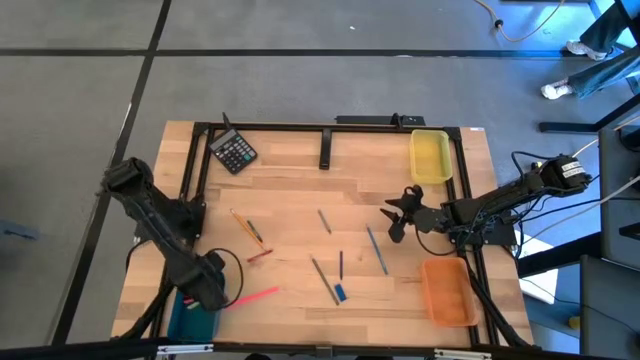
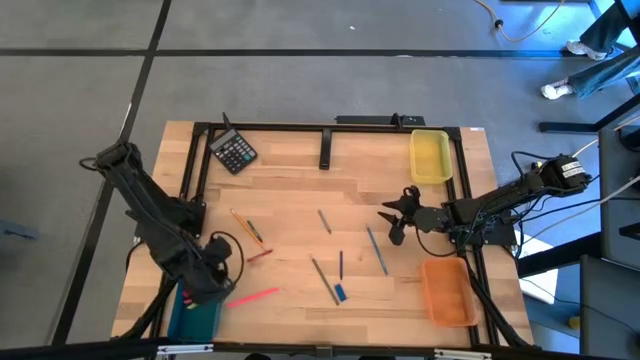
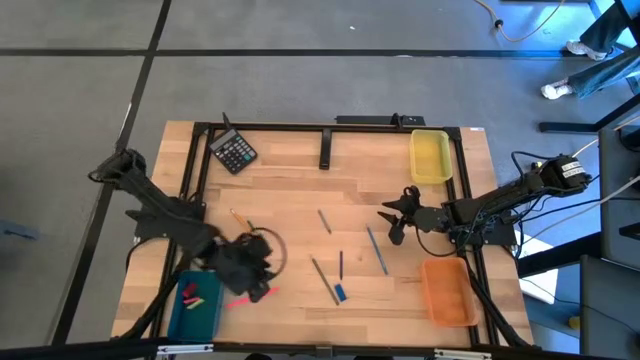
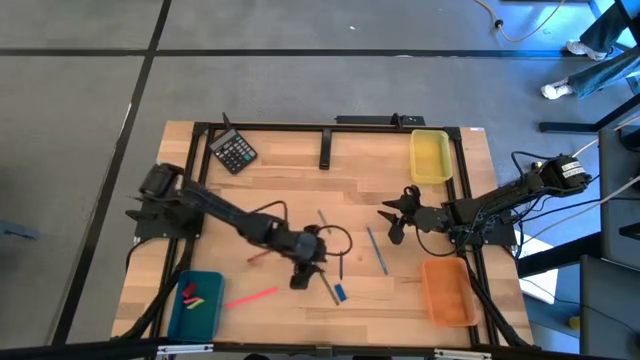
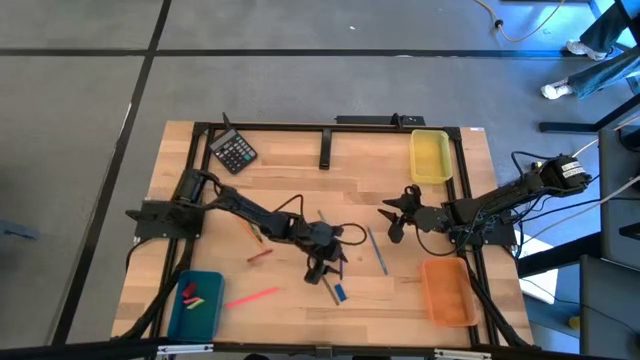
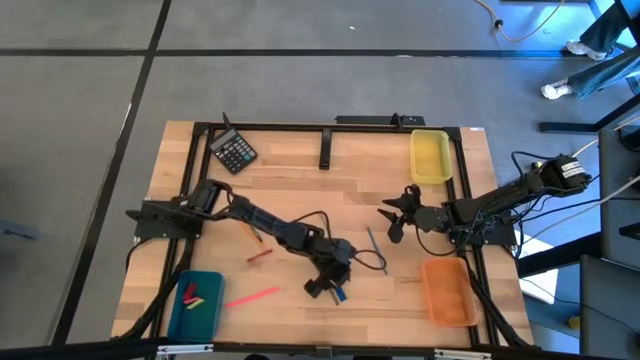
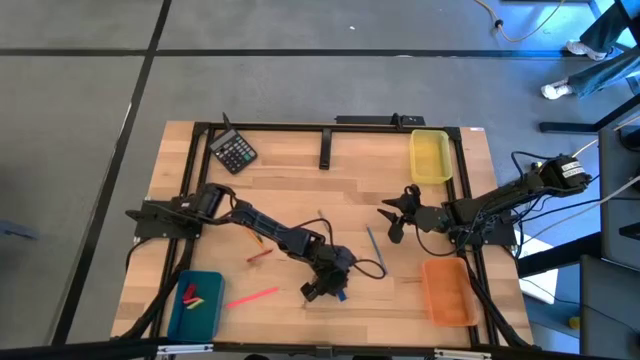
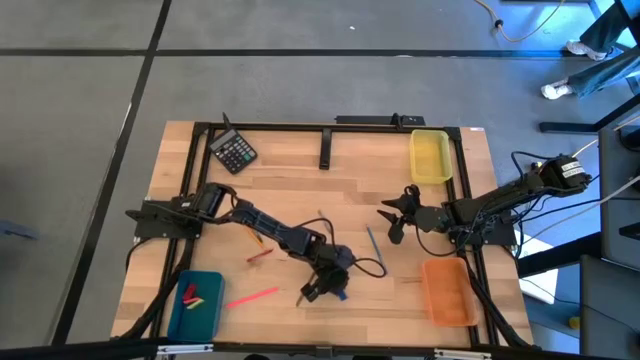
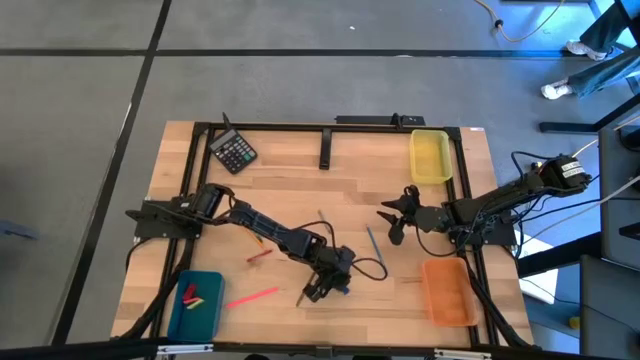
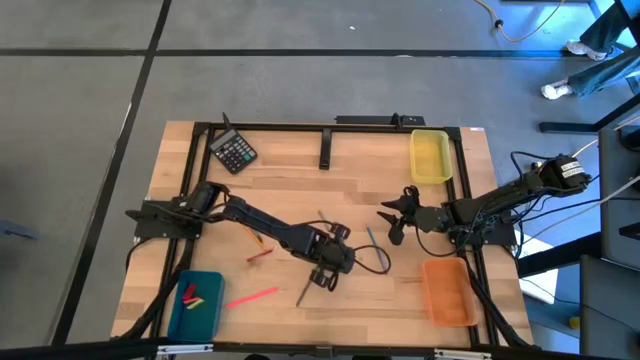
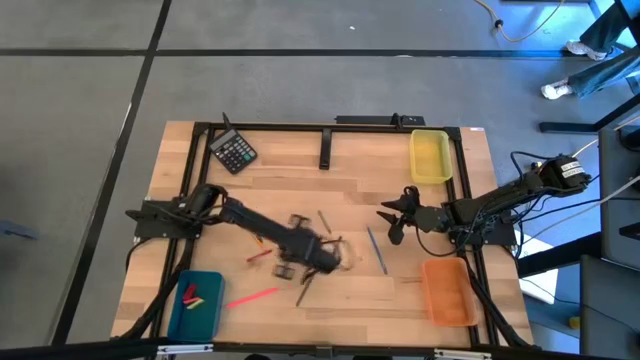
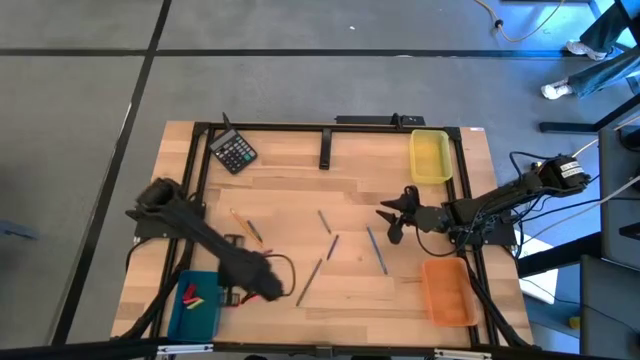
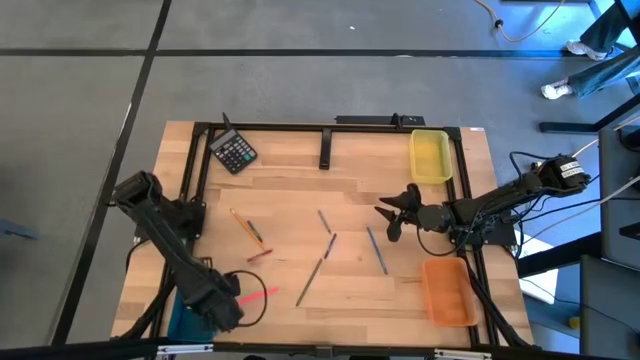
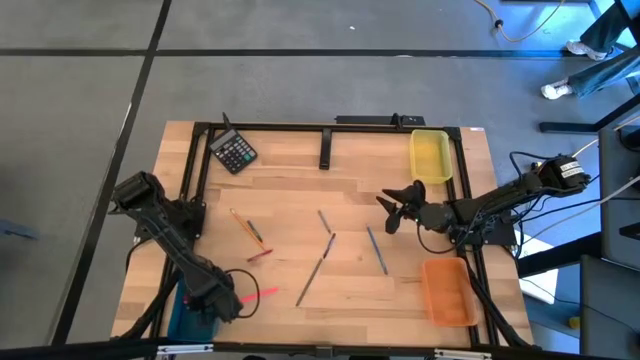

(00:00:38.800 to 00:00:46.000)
Task: Sort crayons/erasers/pens/pencils in bins
Put the blue eraser into the blue bin

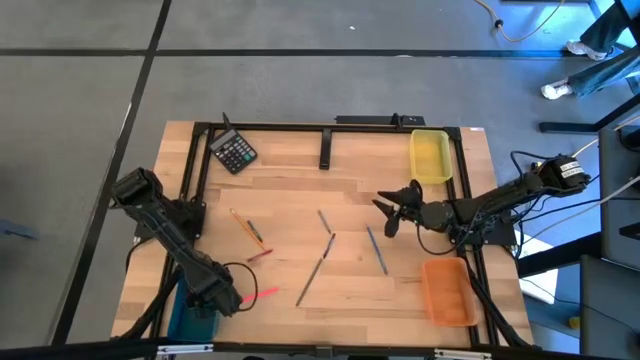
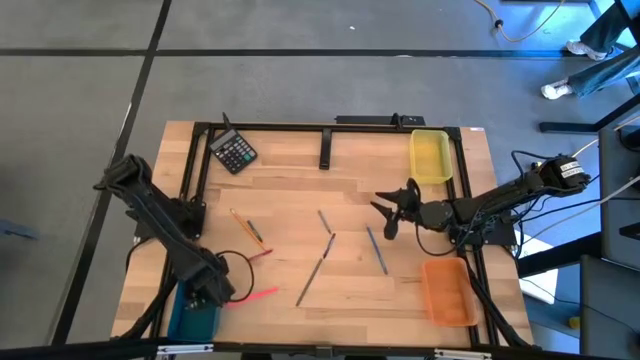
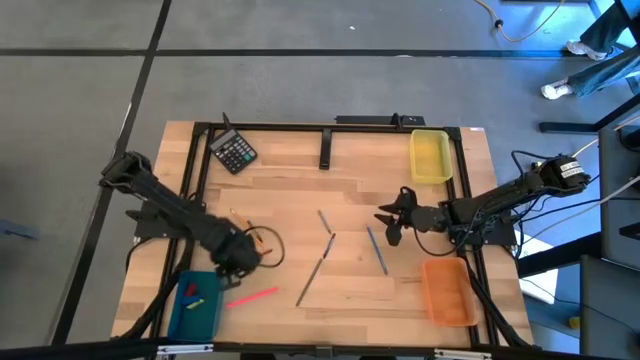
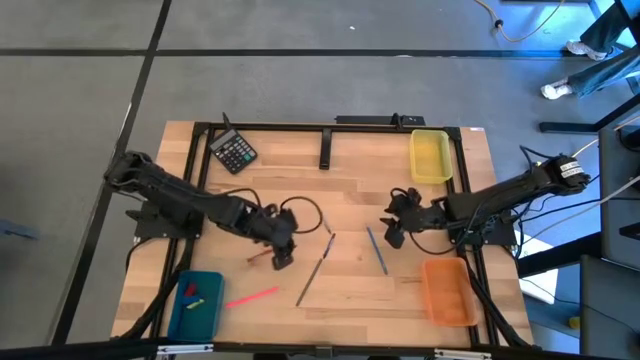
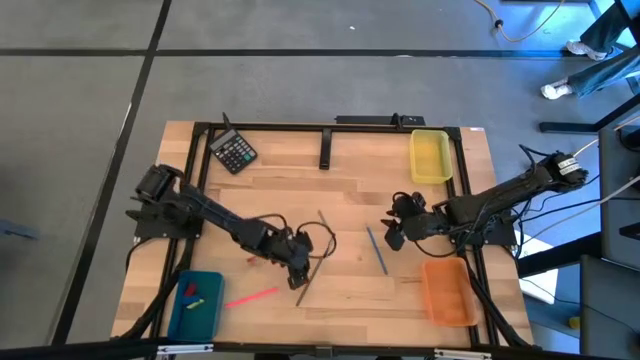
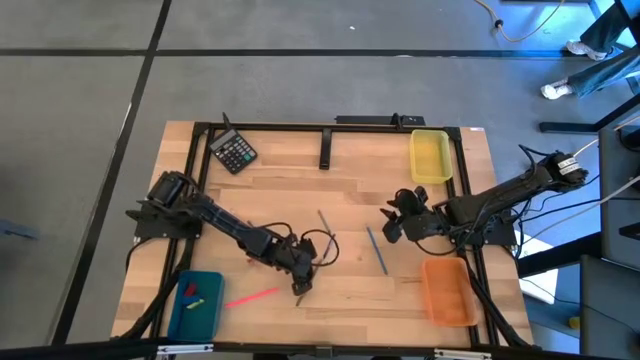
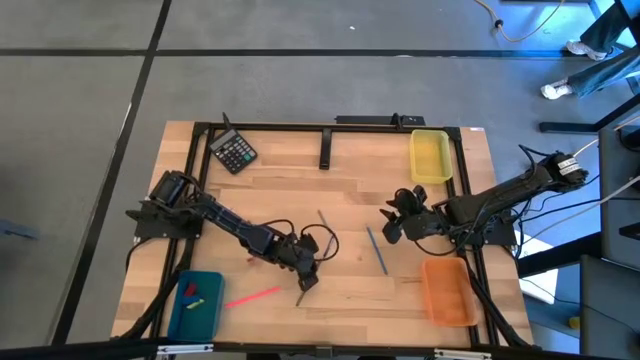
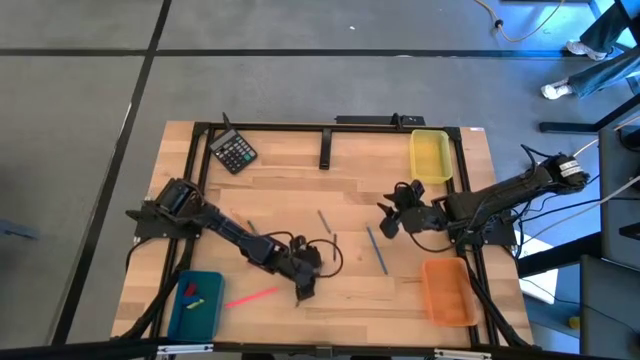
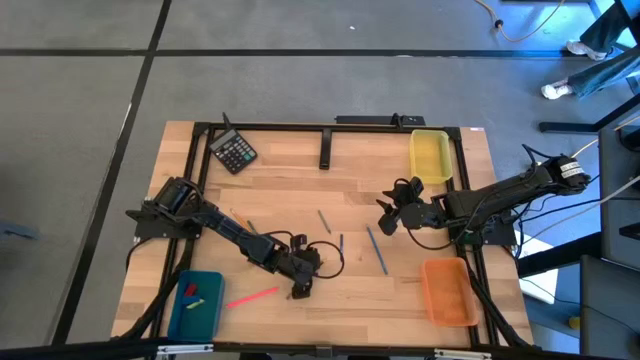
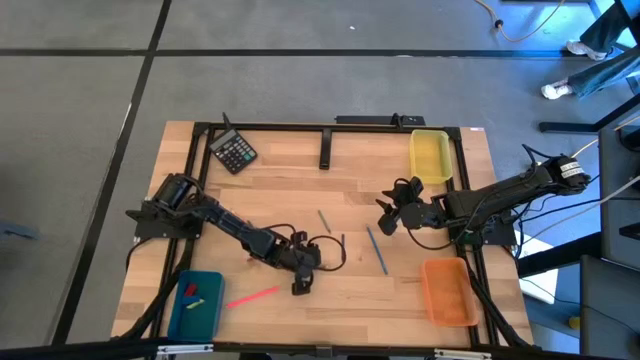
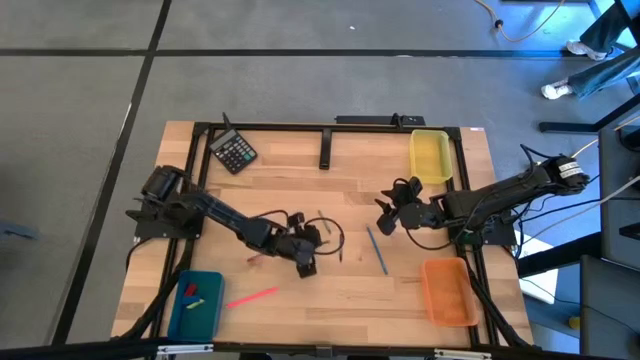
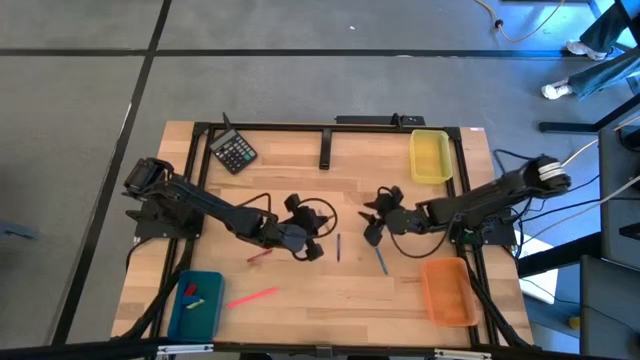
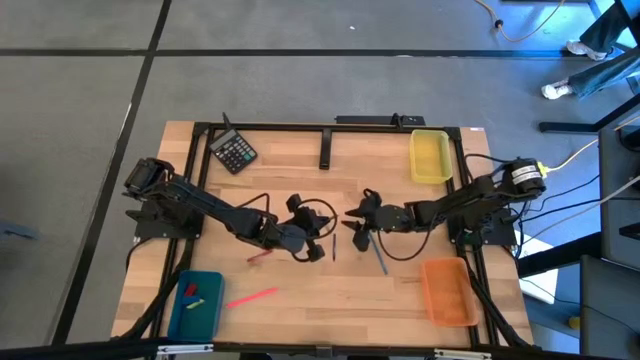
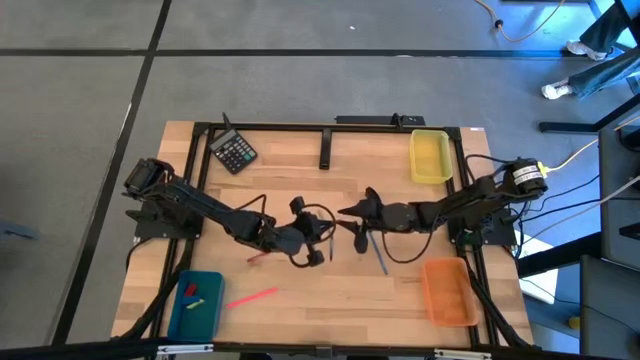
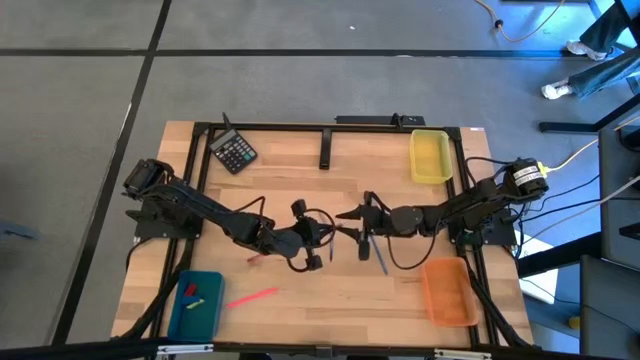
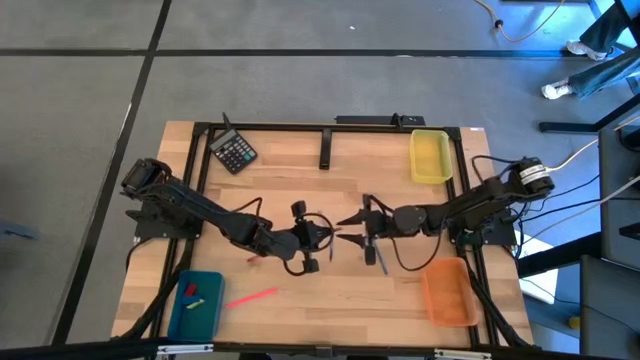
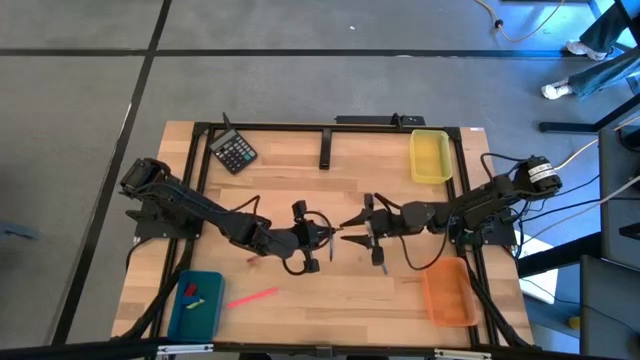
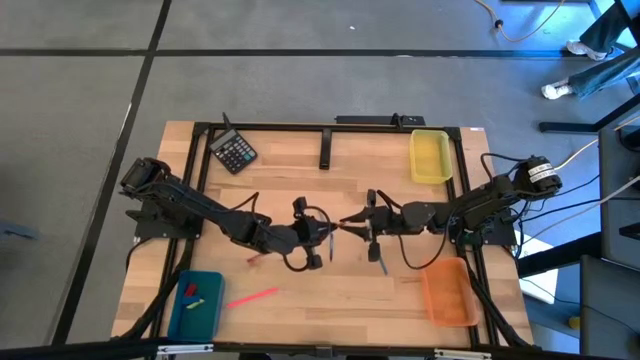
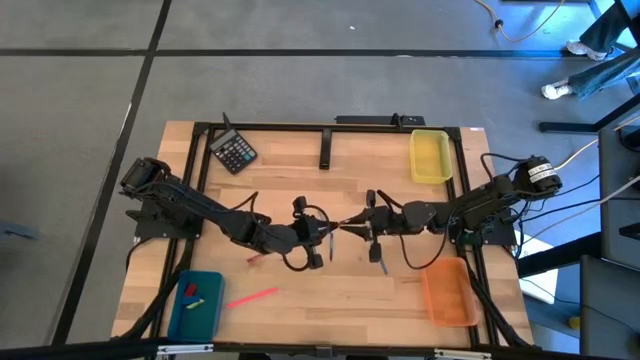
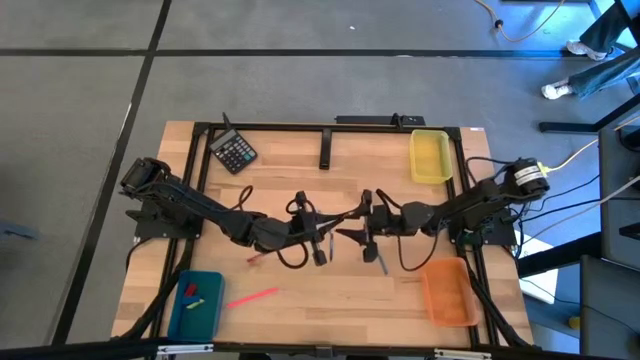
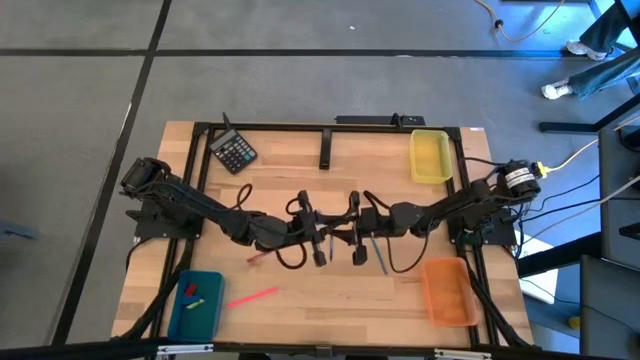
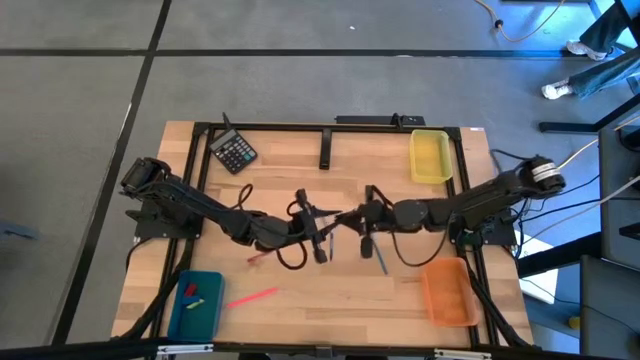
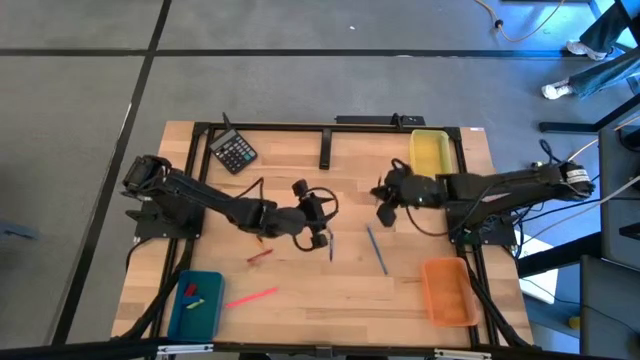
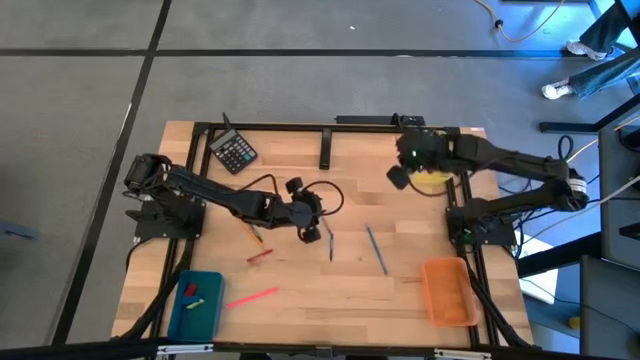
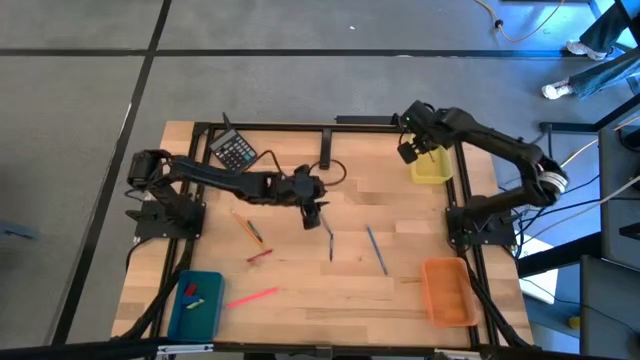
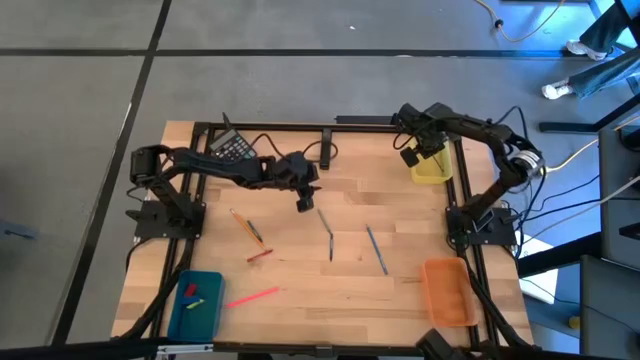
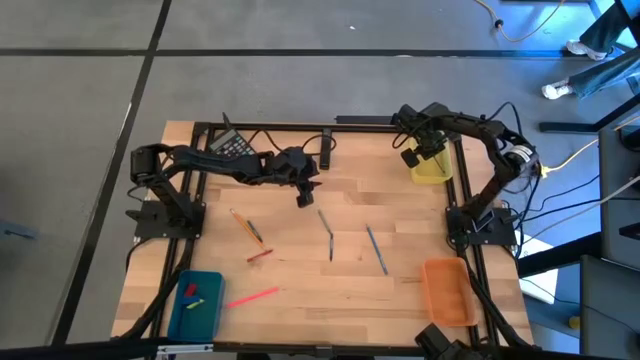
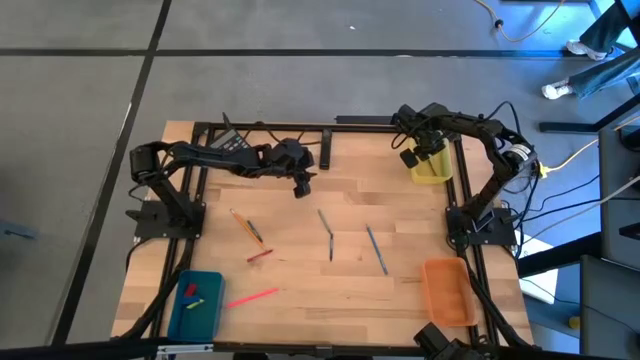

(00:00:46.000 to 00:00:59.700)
Put the black pencil into the yellow bin

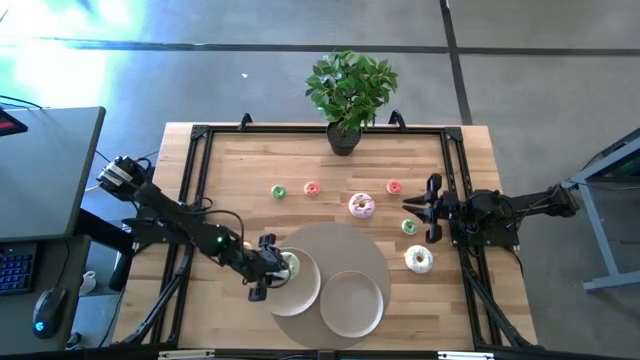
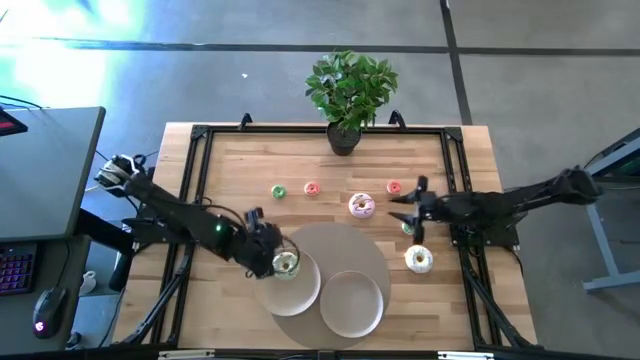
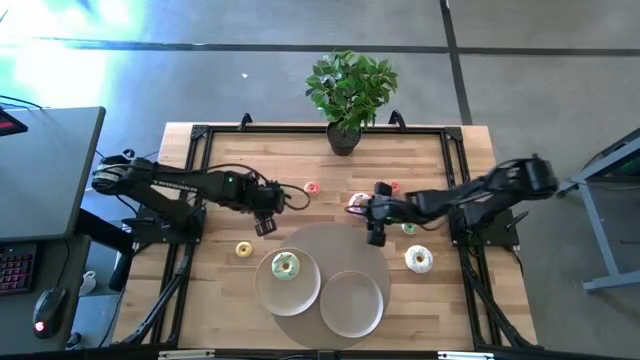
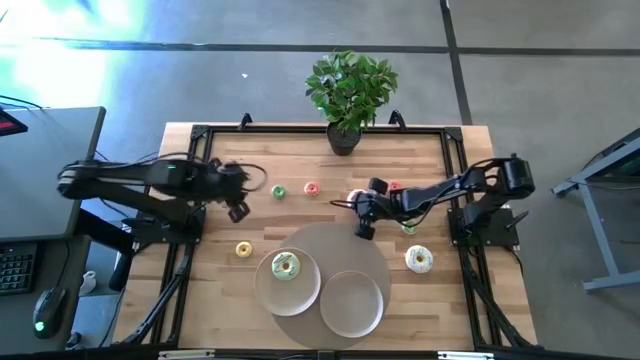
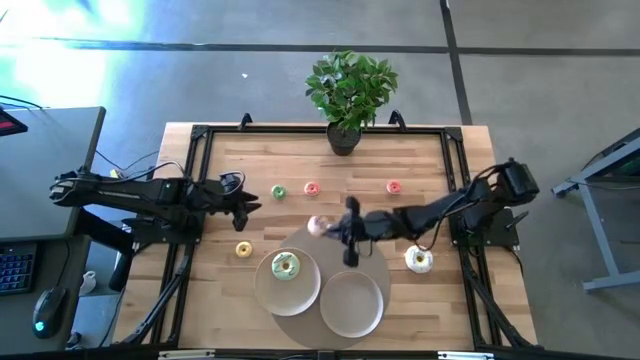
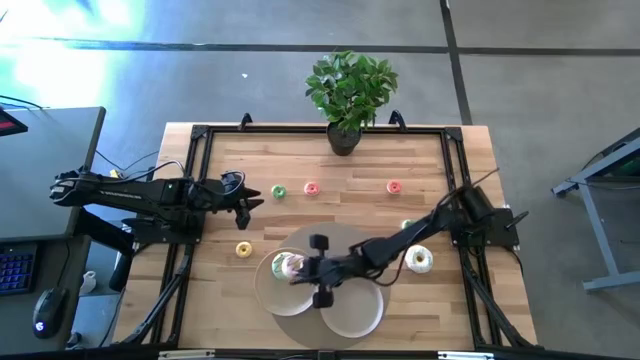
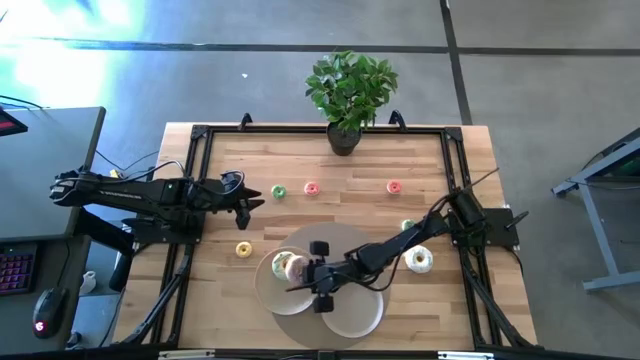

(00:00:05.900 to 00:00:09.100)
Task: Pick & Place donuts
Put the large pink donut on the left white plate
